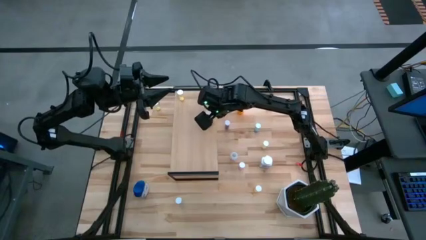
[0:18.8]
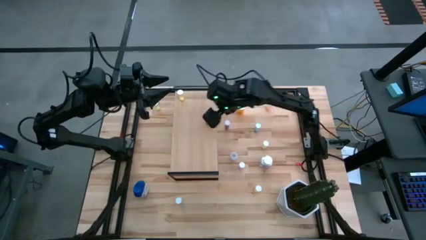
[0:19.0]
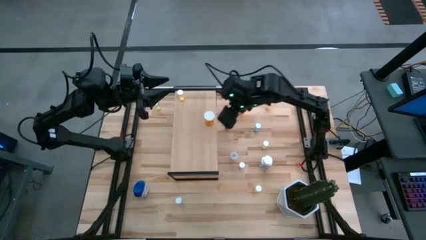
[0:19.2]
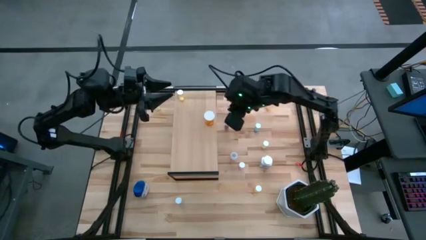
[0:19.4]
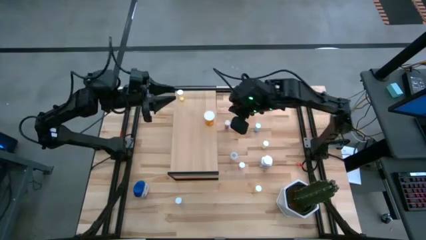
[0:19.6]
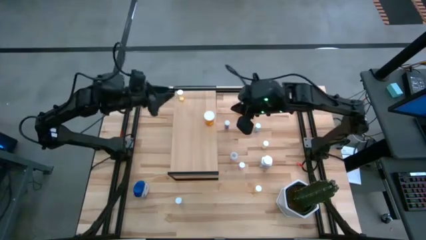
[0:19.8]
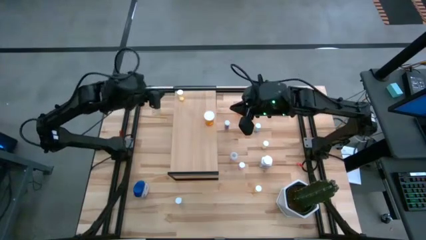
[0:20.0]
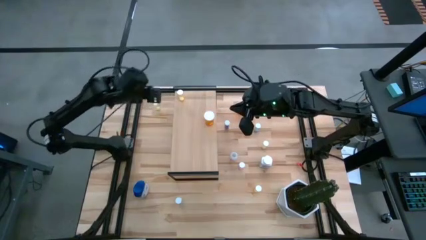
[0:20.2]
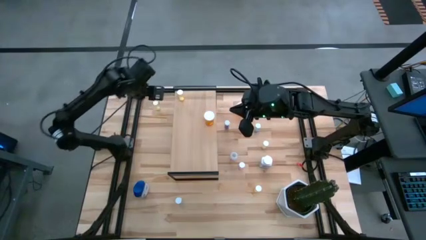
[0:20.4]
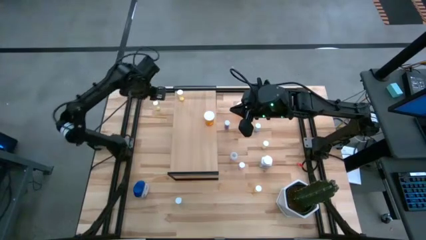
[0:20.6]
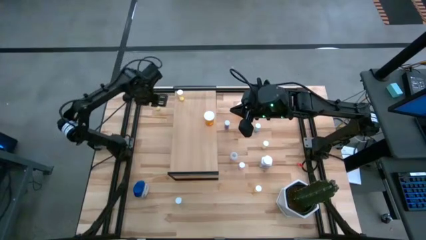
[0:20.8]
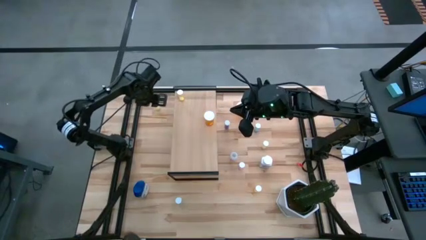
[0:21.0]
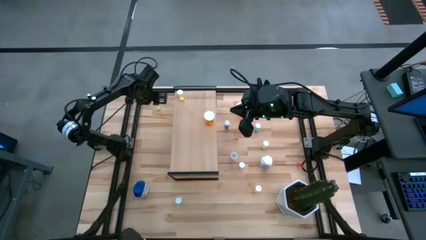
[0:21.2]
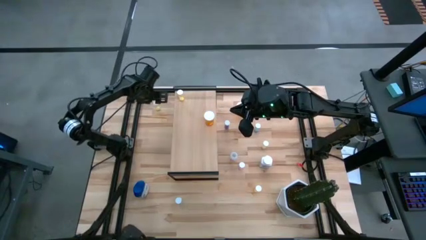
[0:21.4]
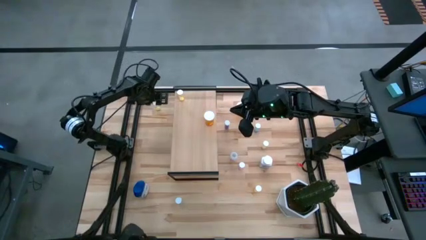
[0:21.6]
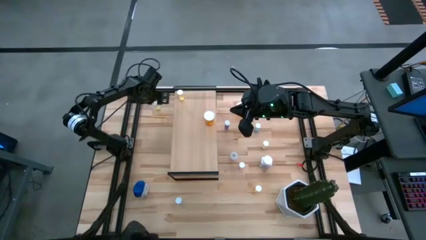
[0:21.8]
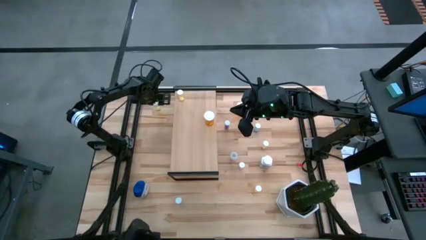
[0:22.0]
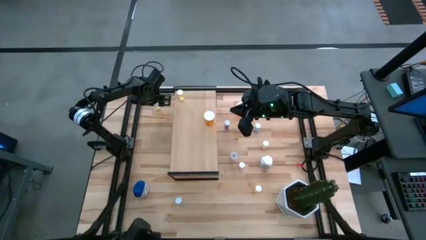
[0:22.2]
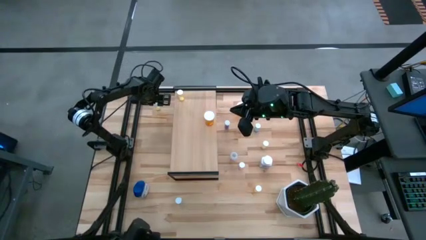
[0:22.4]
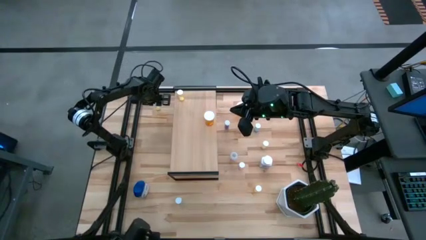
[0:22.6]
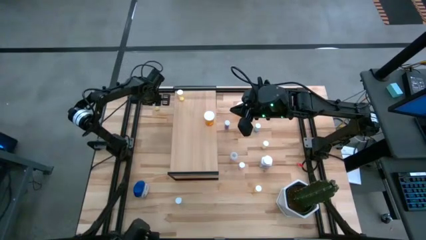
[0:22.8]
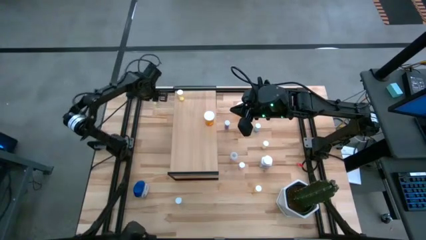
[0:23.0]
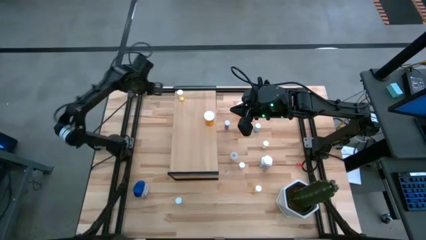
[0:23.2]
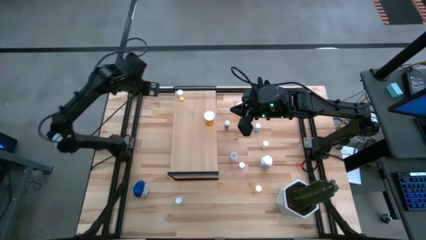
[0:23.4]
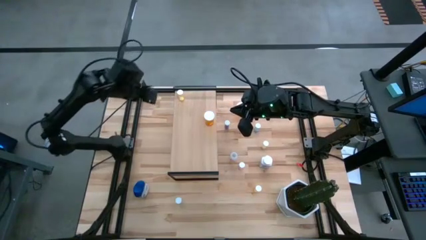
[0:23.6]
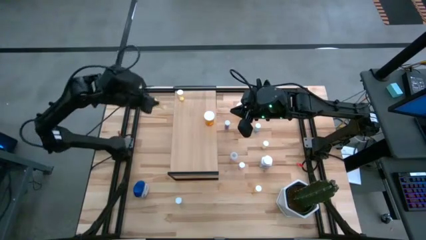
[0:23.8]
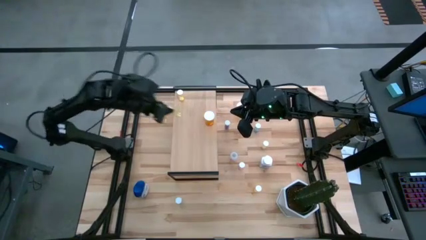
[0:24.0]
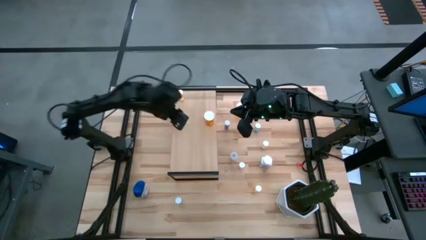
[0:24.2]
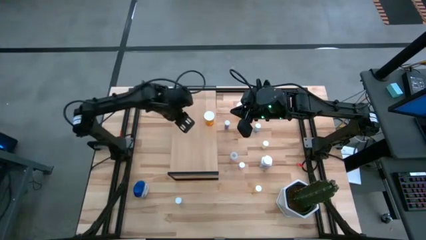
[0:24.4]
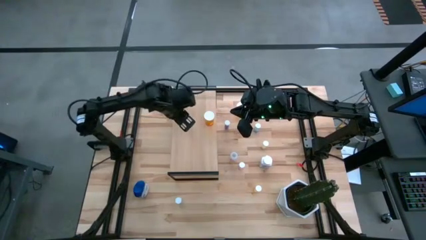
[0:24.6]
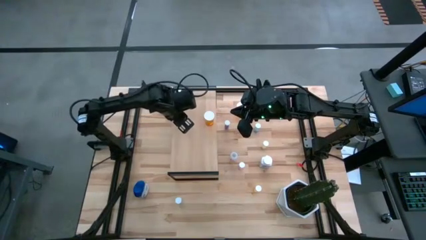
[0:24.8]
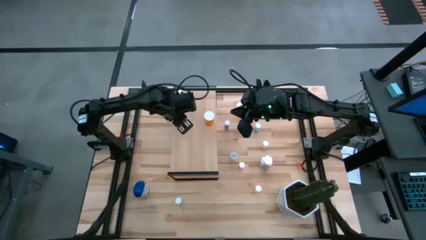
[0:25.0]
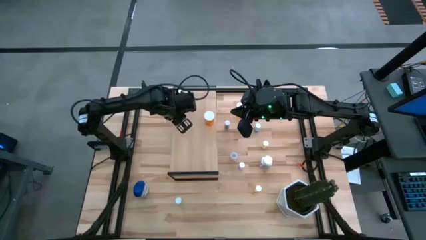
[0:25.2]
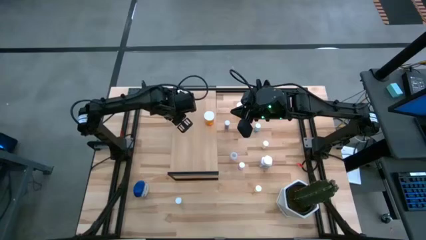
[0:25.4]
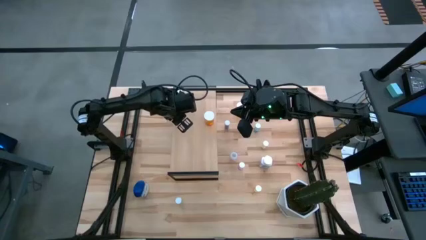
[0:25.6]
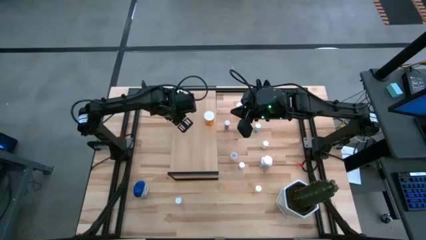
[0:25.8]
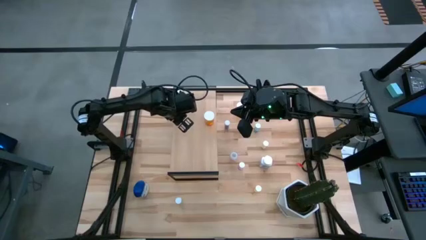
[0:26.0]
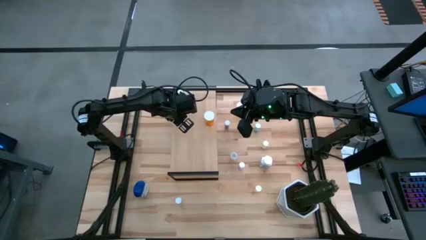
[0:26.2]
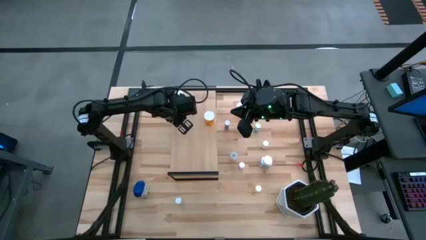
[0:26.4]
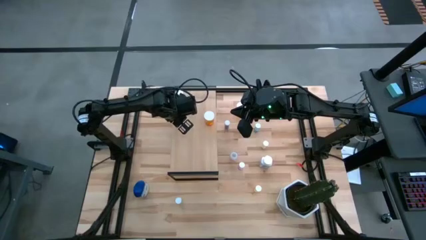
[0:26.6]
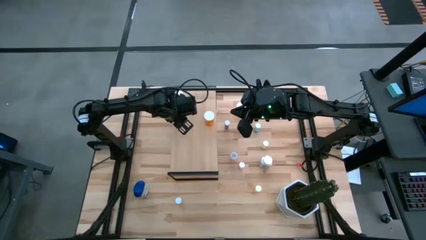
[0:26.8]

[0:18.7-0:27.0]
Task: Pick and place medicine bottles onto shelf by color
Put the top left yellow tablet bottle on the shelf

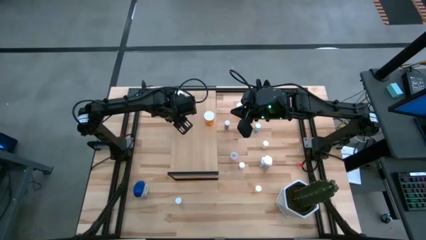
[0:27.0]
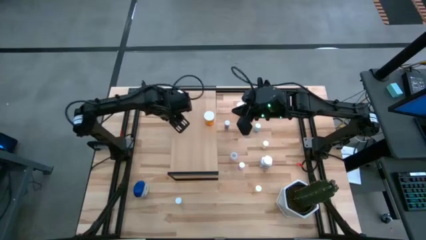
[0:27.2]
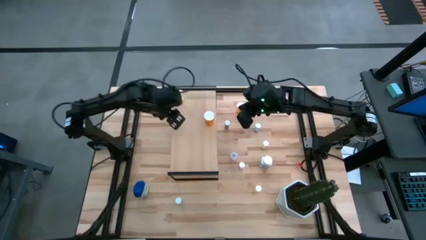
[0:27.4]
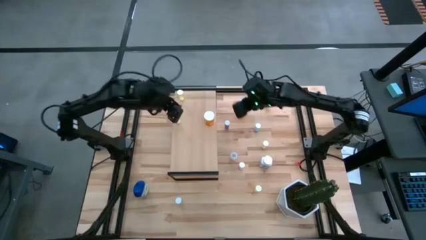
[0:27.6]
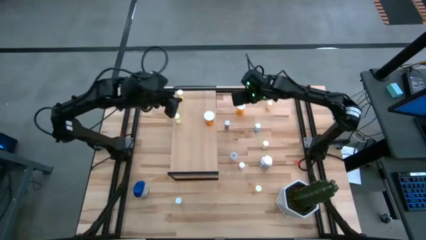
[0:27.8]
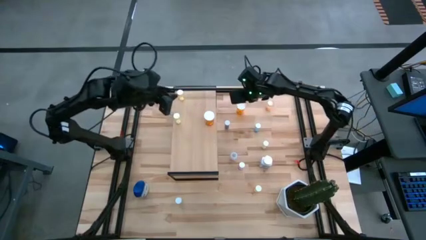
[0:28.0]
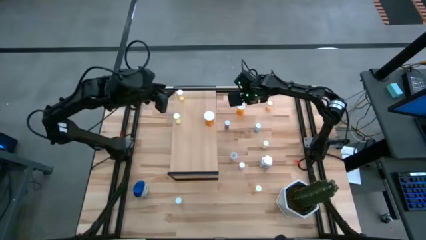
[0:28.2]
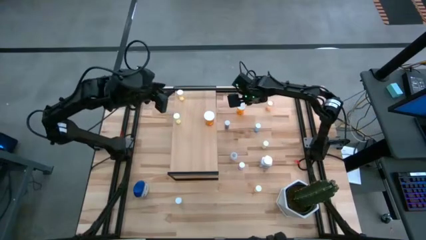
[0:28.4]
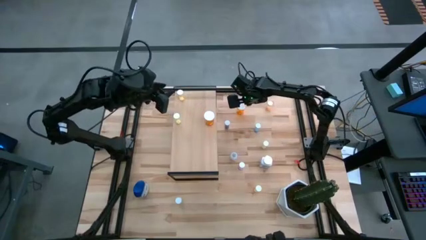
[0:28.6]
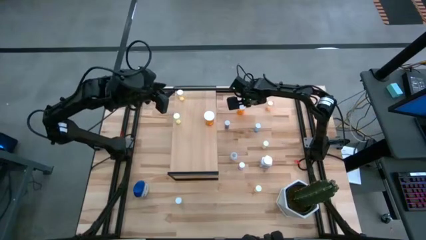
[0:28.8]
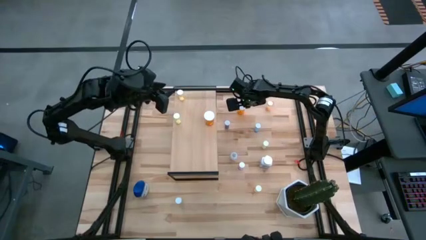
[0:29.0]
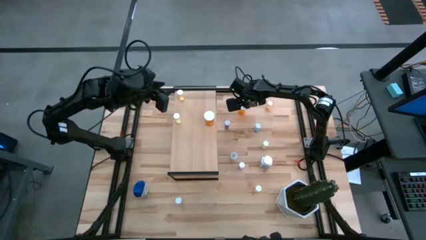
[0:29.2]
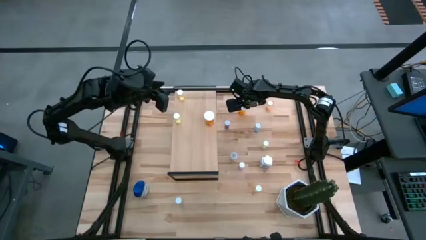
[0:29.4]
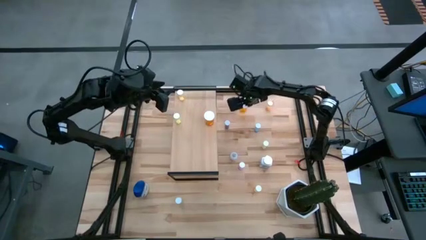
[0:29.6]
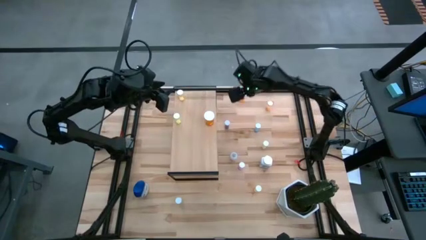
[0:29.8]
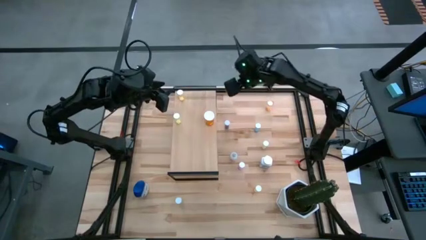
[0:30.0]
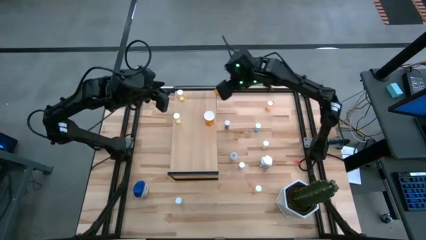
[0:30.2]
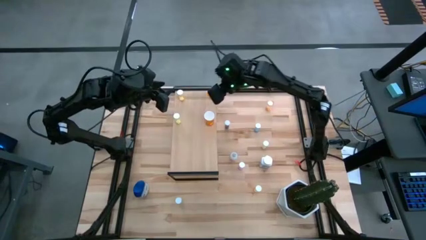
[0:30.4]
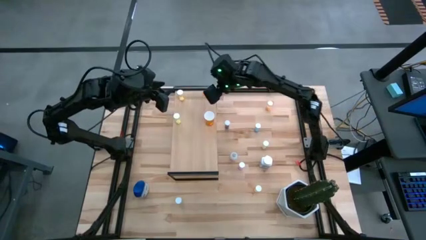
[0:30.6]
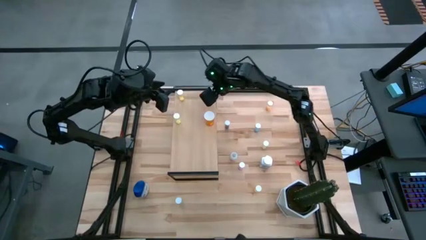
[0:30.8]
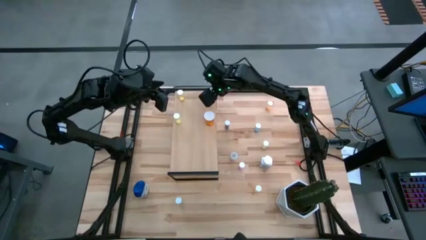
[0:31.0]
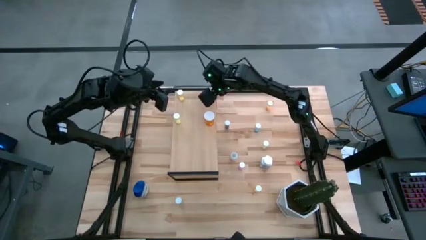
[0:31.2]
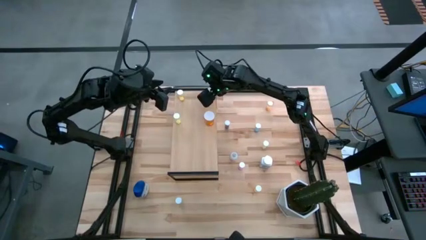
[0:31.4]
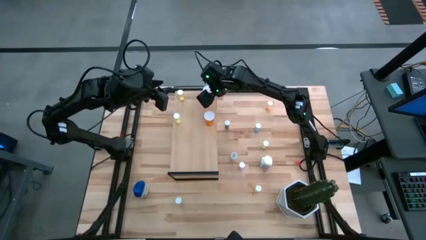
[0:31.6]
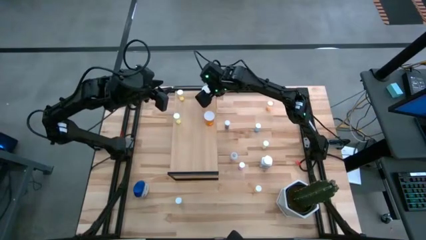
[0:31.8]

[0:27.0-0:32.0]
Put the top center orange capsule bottle on the shelf

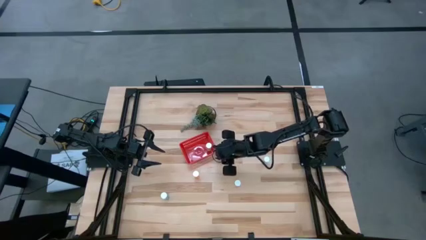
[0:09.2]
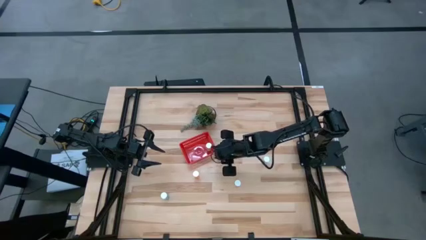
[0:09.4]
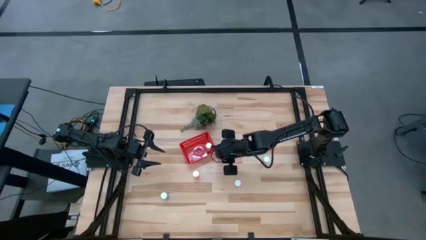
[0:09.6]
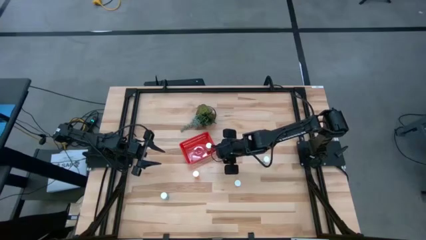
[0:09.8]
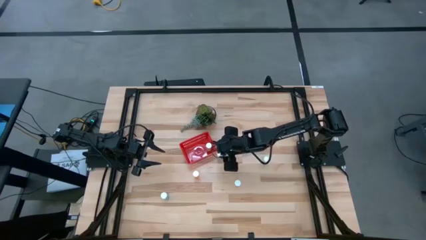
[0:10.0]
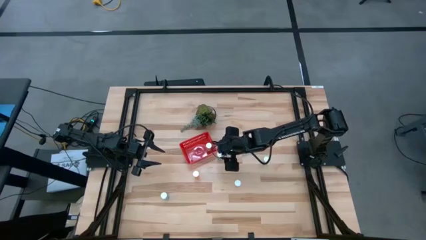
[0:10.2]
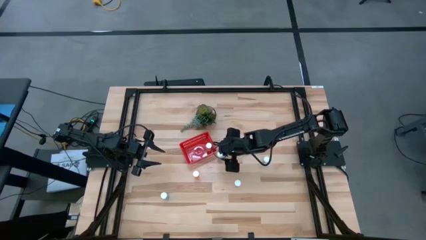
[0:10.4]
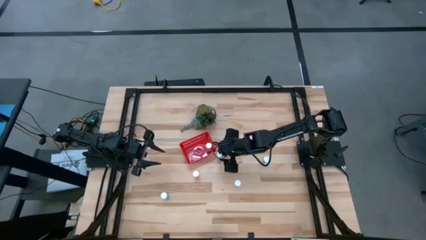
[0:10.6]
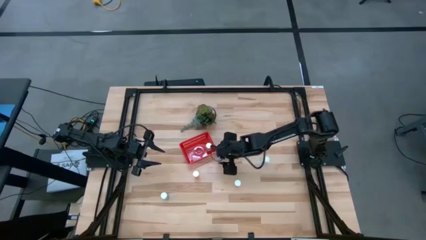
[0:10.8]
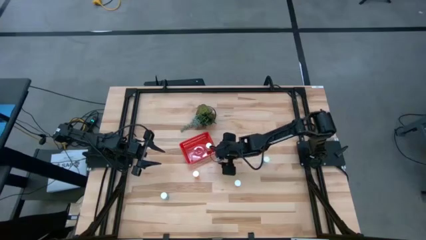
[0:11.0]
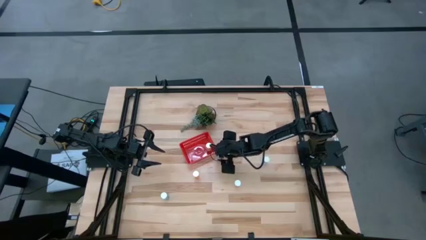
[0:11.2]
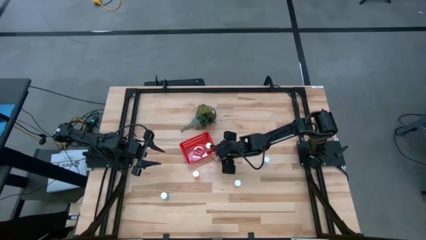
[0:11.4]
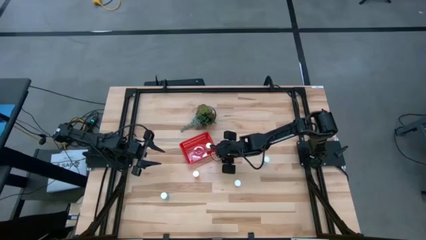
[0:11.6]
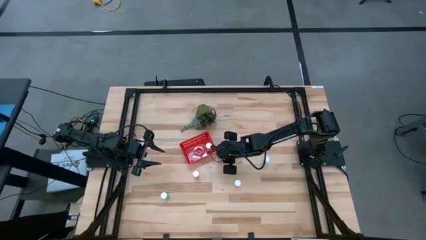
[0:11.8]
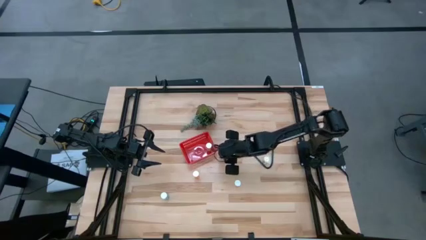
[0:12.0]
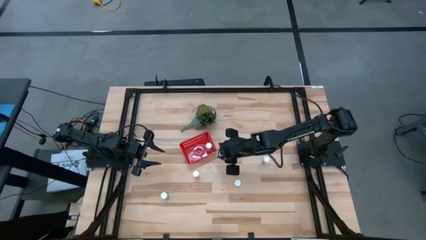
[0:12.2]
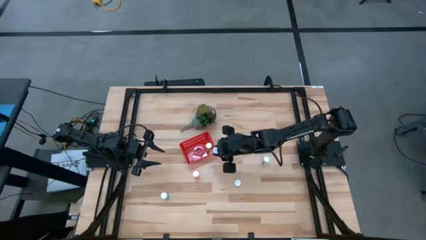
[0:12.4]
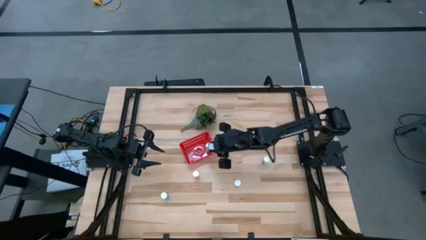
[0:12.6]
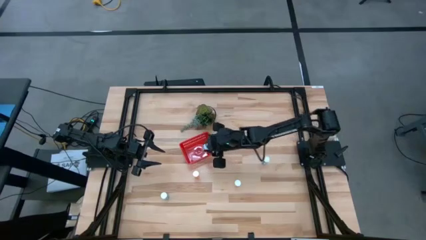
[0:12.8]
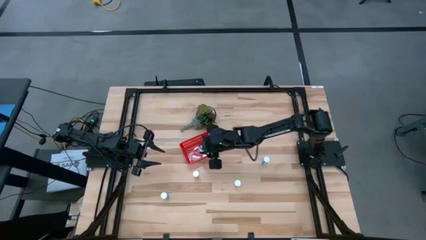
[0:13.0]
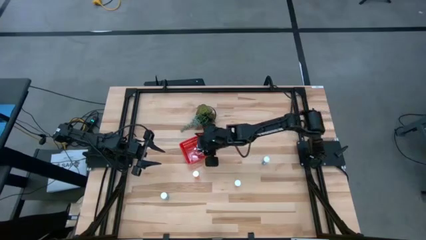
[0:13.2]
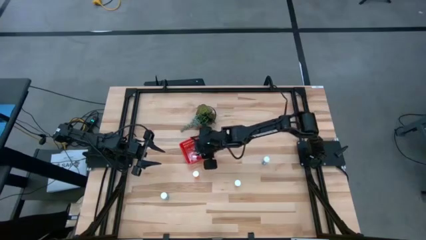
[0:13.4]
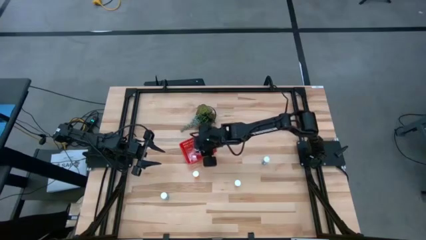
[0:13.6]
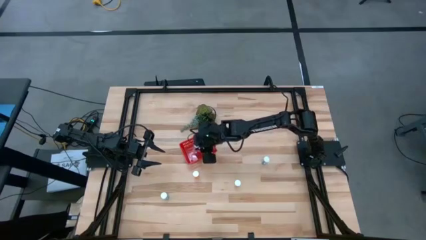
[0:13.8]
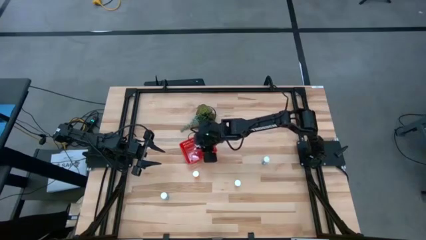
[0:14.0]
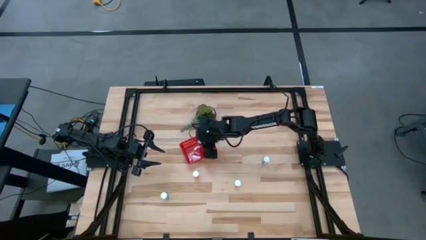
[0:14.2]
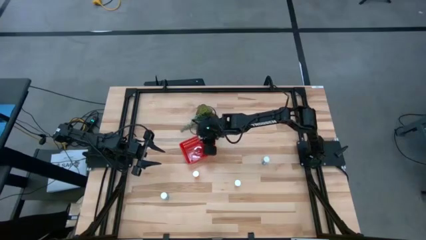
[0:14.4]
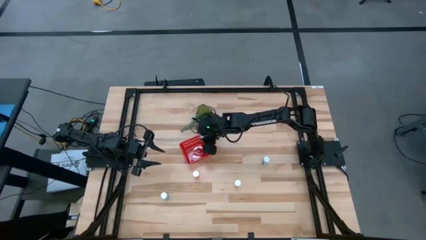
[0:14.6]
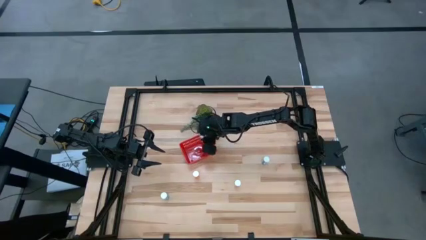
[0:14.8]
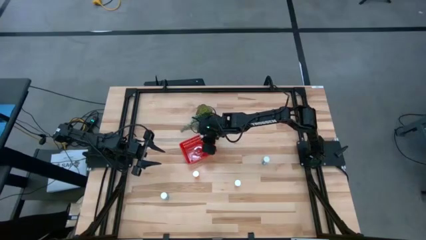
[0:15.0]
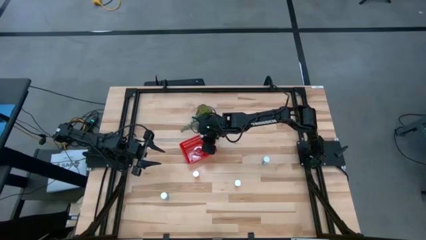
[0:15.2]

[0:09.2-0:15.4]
Task: Pick and place pill bottles into a basket
Put the green pill bottle into the red bin
